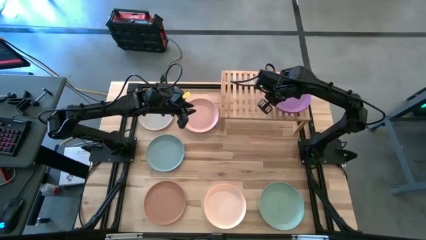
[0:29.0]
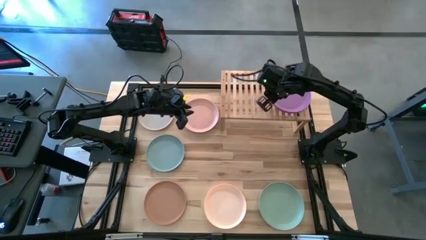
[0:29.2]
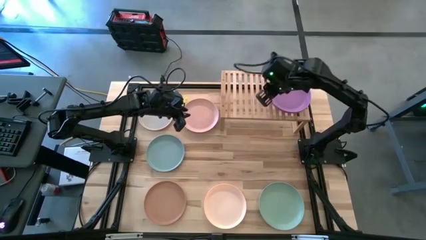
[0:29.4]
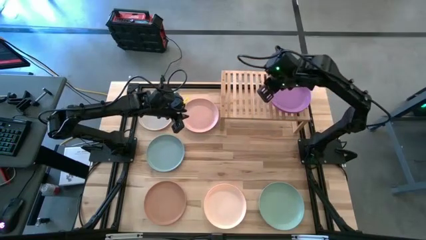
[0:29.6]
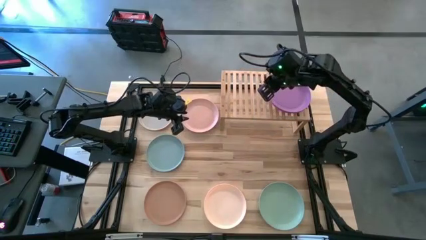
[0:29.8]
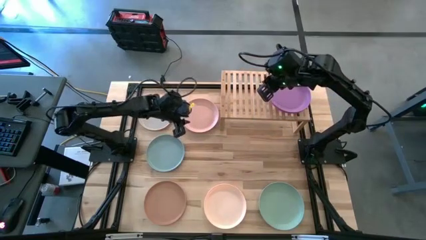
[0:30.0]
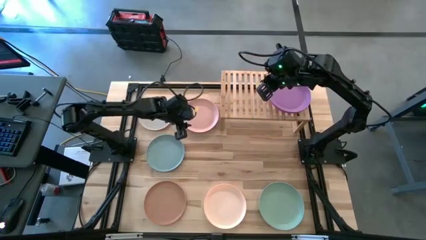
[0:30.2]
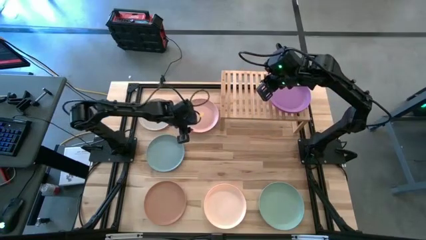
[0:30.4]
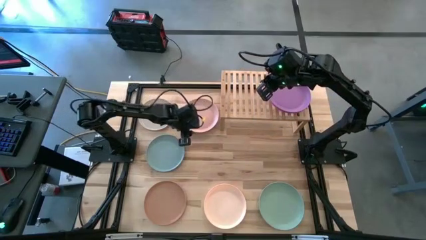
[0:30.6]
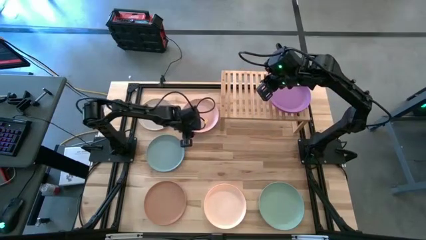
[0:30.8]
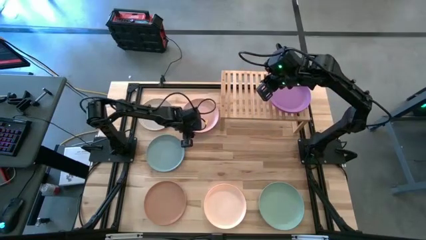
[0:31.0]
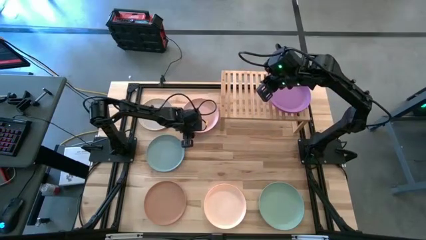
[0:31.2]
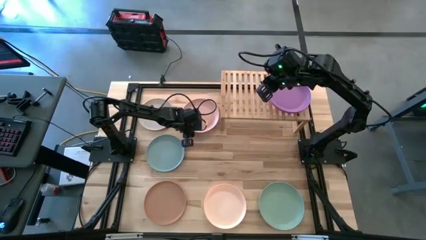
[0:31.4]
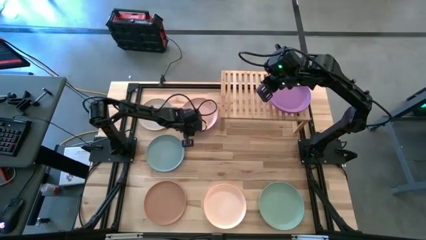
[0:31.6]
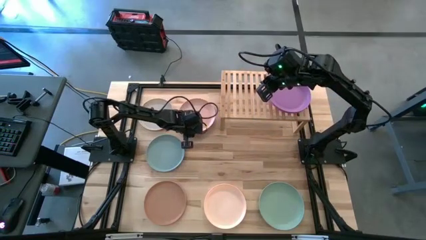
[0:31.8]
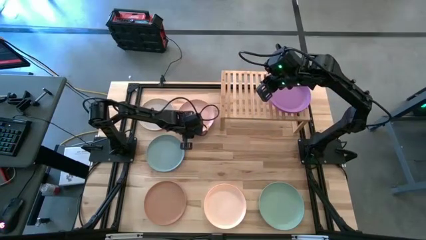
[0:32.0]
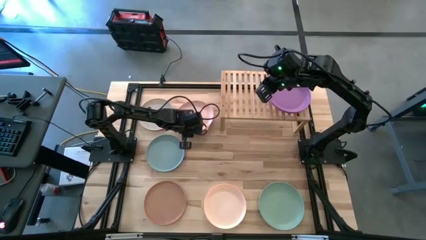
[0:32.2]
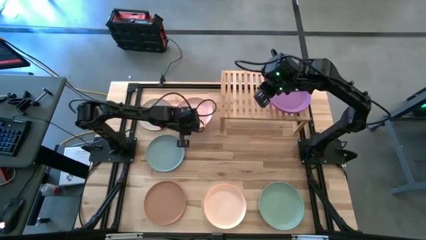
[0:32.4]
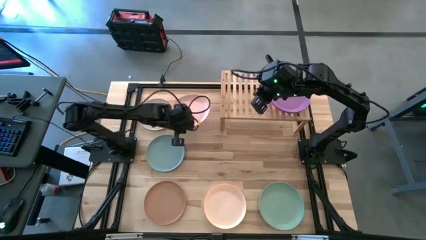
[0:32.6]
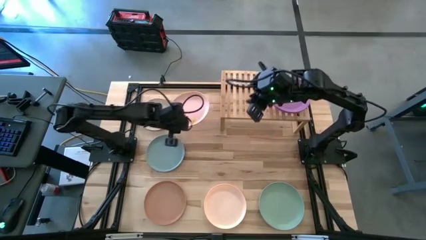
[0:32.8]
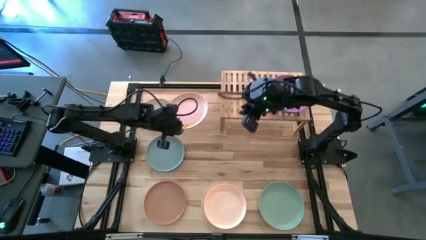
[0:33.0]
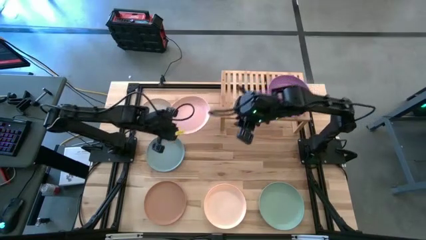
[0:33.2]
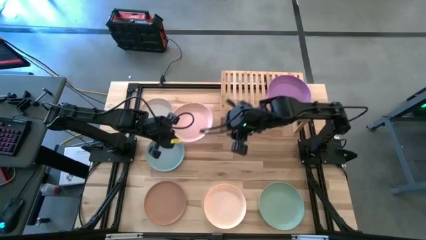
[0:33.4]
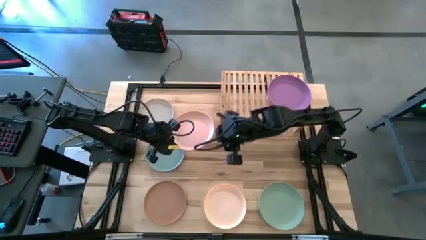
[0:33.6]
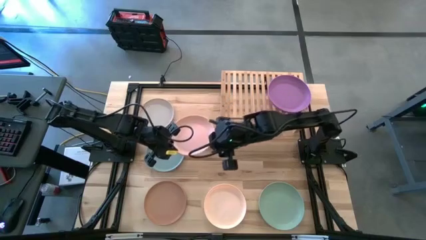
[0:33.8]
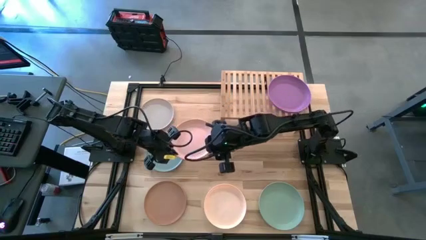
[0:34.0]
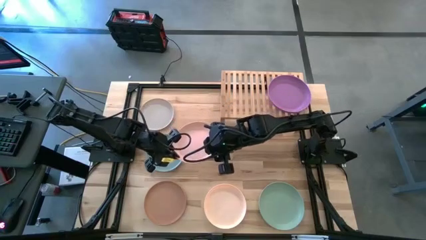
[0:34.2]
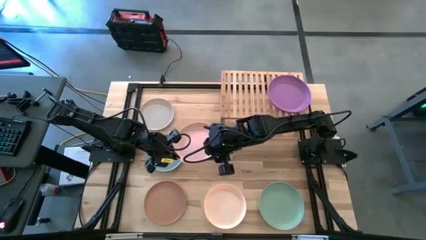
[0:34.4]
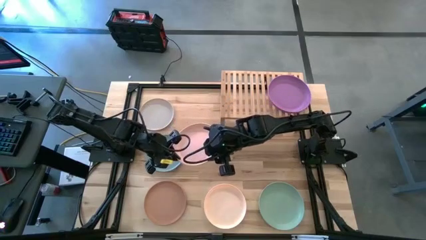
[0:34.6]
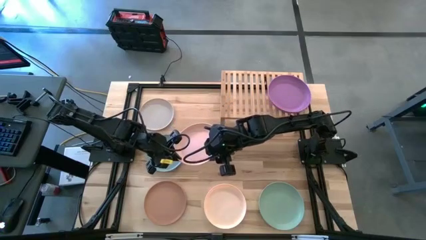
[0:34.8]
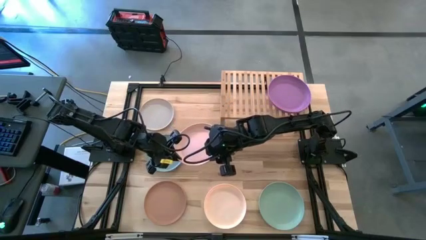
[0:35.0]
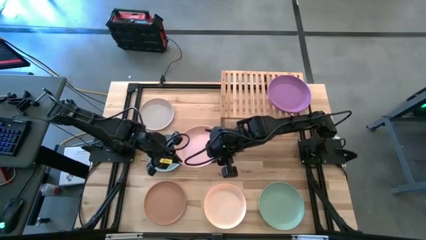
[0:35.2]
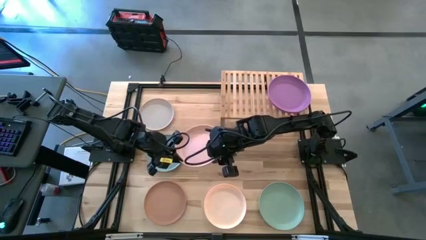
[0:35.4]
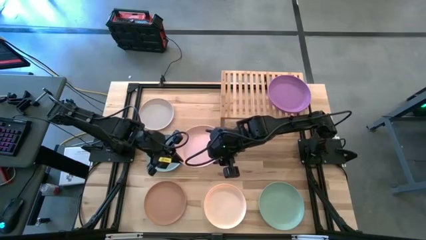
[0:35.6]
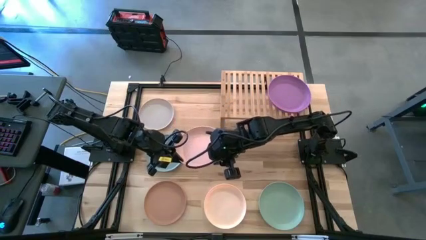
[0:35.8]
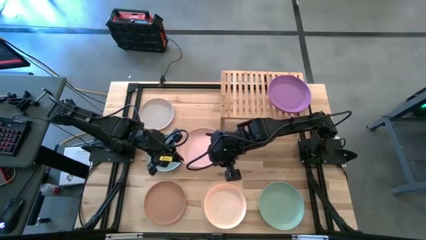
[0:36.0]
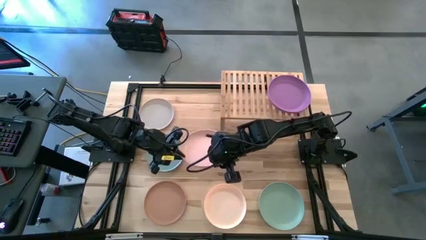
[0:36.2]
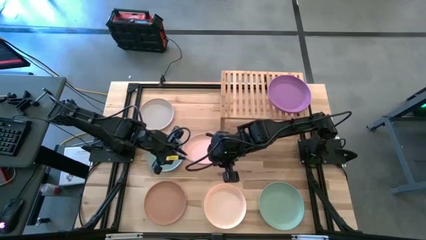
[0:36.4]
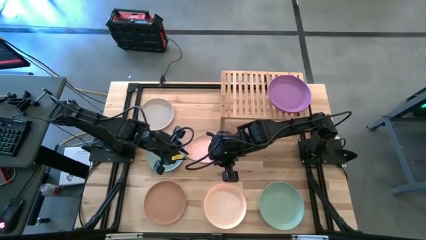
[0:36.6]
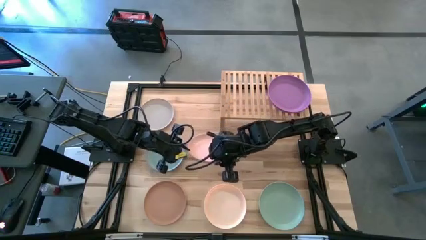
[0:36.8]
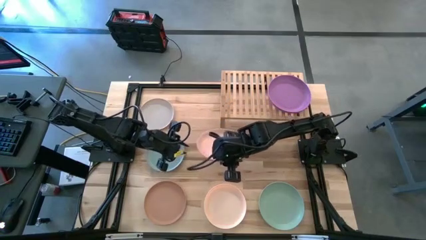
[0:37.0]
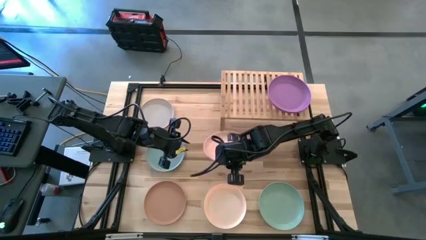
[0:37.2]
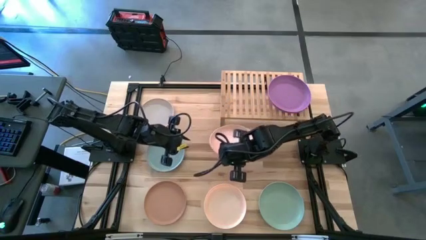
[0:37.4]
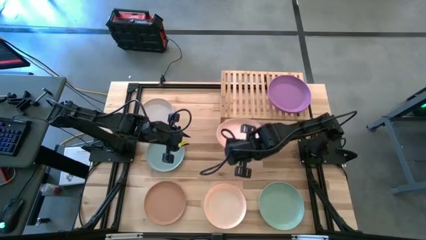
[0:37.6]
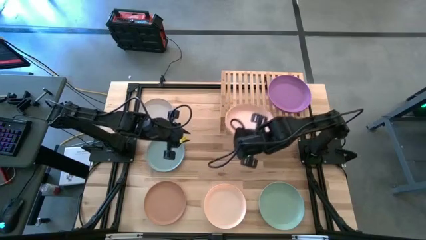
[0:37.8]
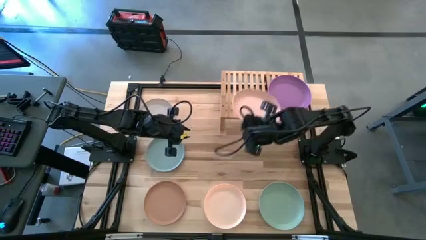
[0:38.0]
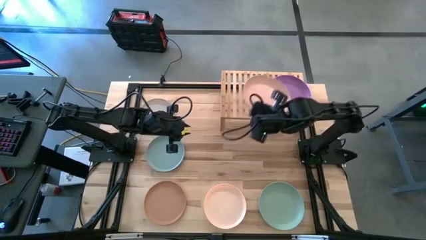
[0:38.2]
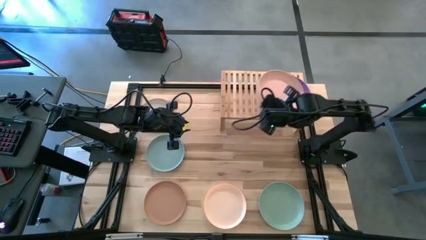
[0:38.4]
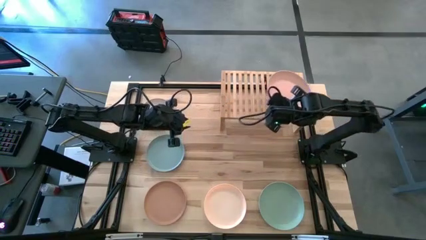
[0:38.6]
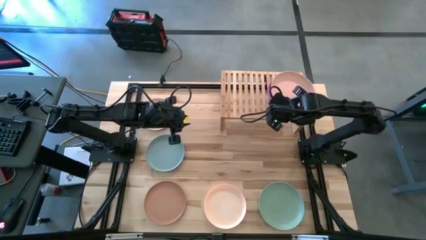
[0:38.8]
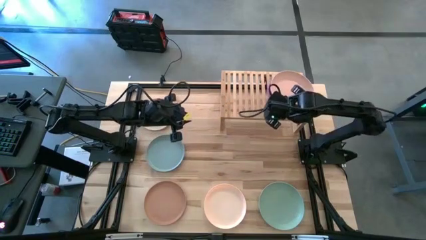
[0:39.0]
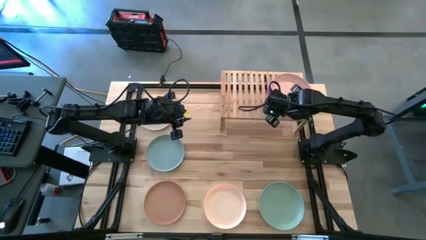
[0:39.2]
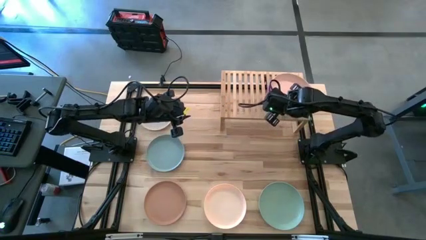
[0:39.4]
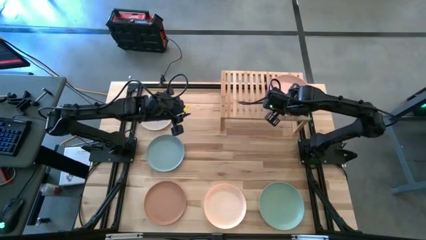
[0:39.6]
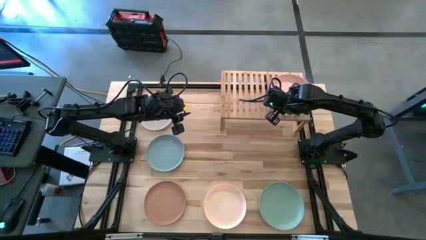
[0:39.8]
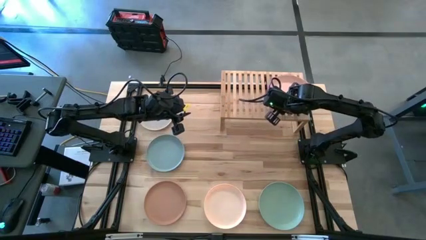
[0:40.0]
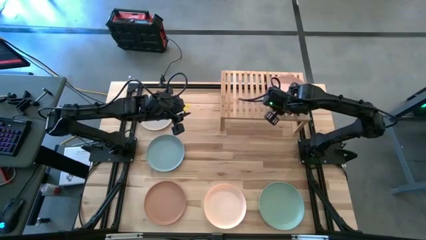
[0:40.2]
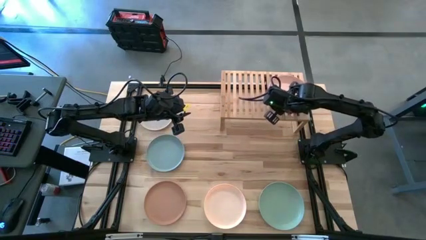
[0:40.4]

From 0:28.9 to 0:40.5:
Task: Place and stack plates onto a shelf
Stack the top light orange plate on top of the violet plate on the shelf
